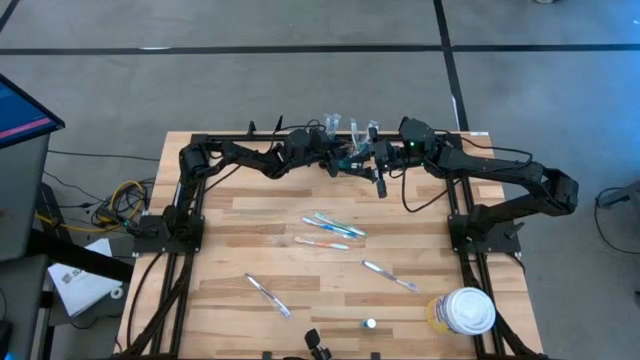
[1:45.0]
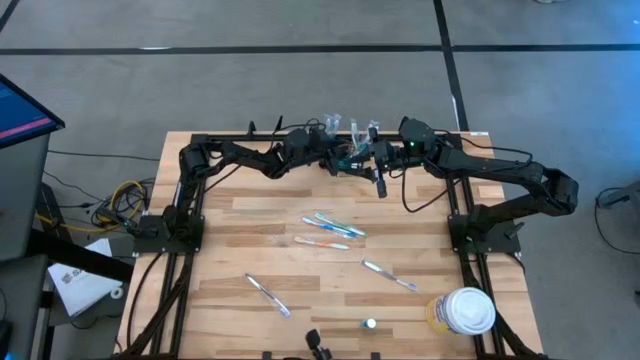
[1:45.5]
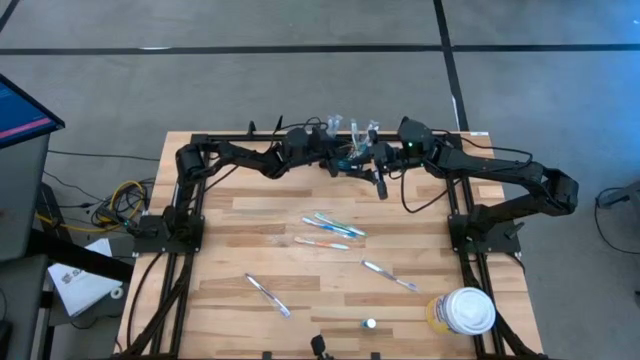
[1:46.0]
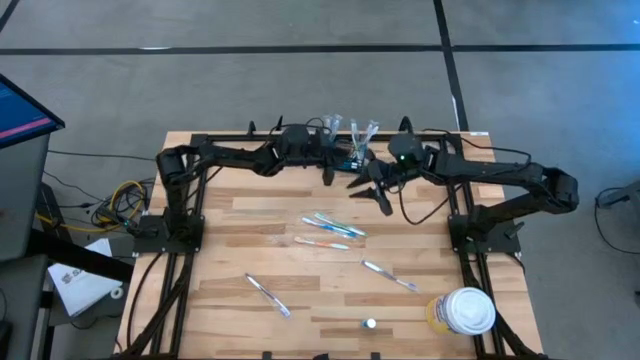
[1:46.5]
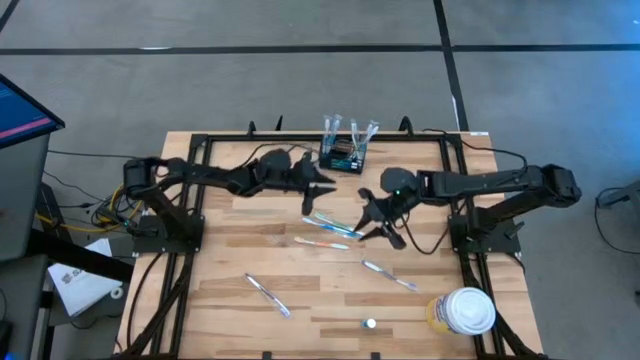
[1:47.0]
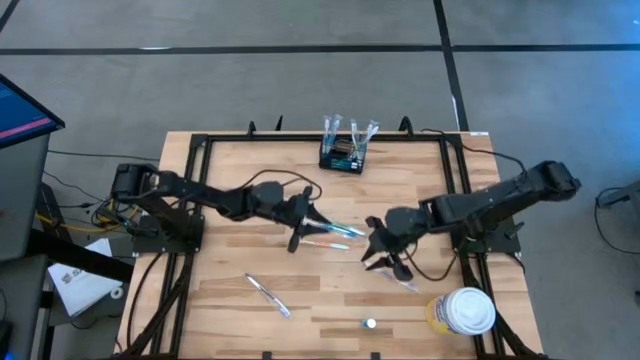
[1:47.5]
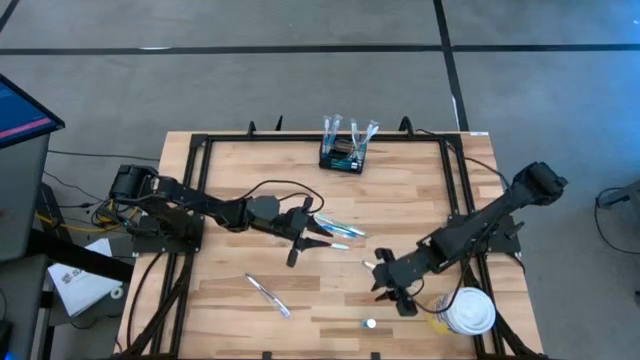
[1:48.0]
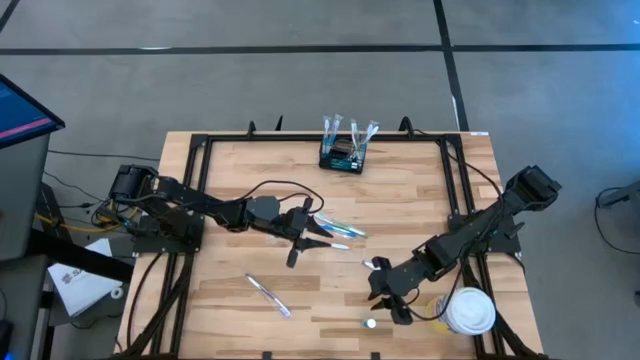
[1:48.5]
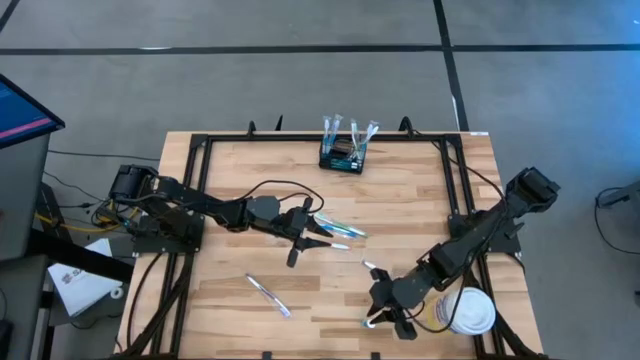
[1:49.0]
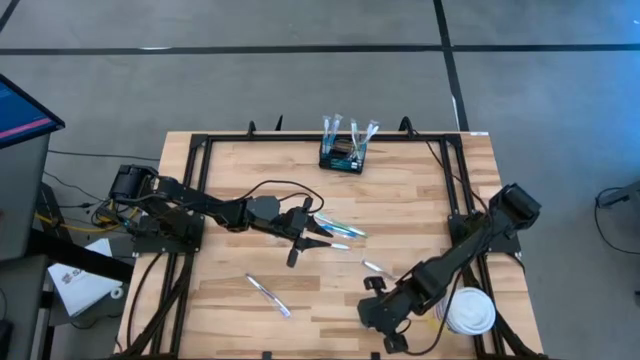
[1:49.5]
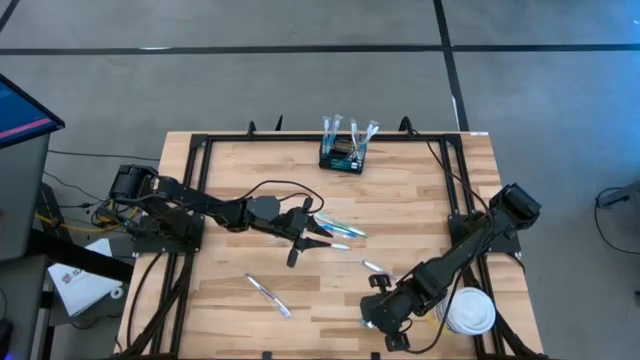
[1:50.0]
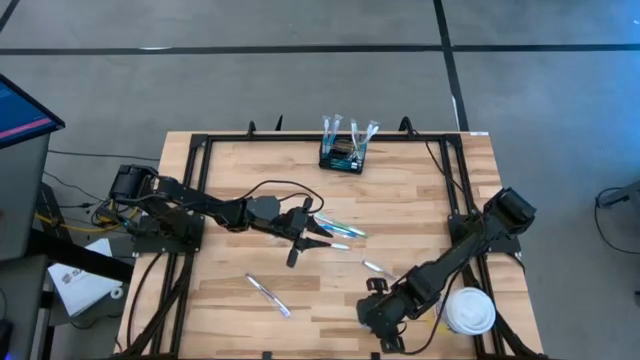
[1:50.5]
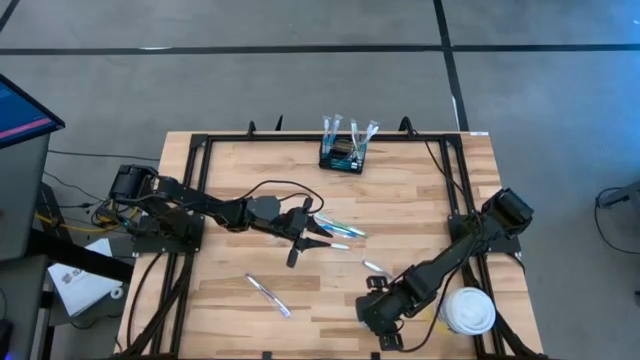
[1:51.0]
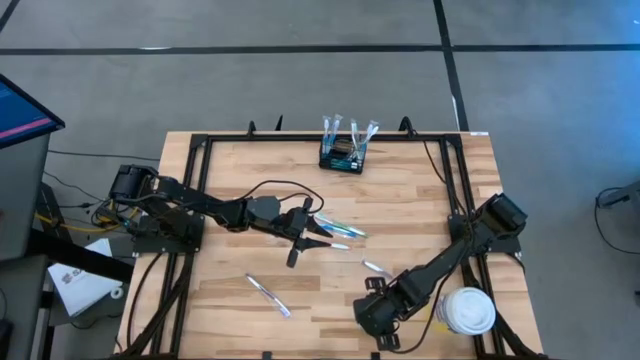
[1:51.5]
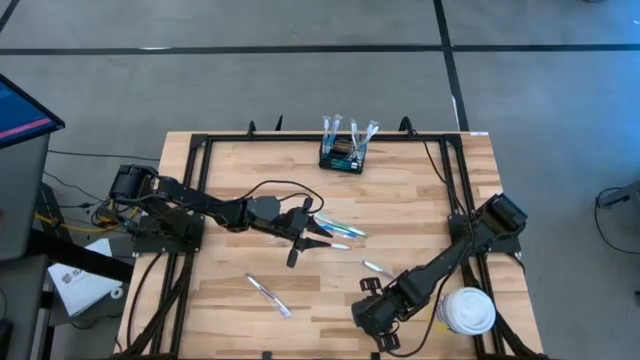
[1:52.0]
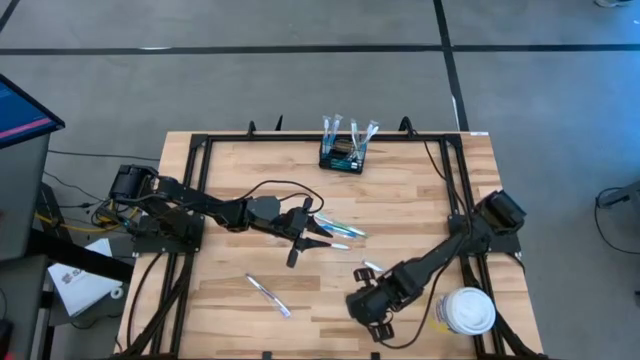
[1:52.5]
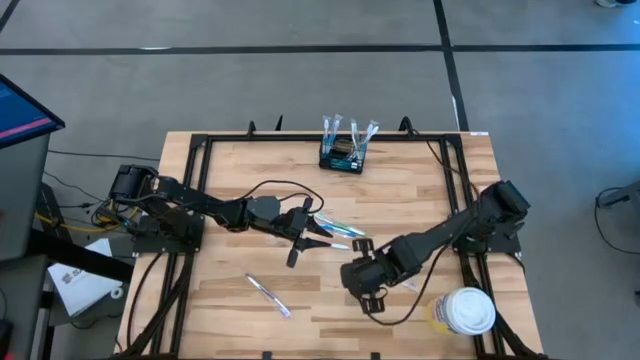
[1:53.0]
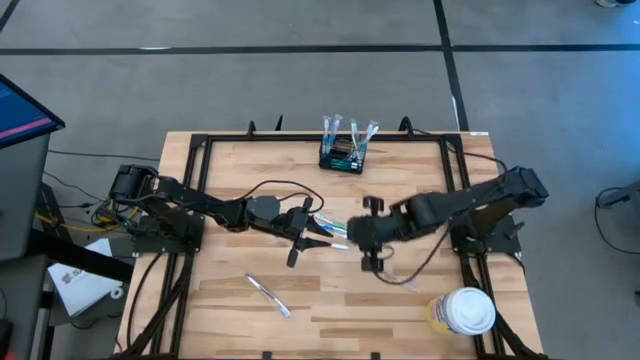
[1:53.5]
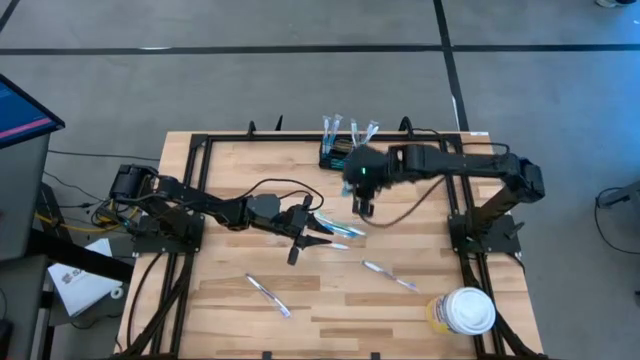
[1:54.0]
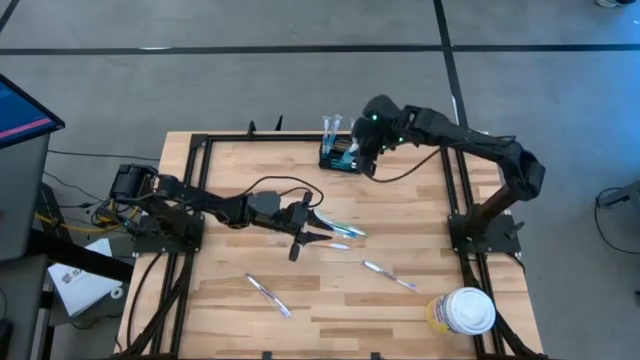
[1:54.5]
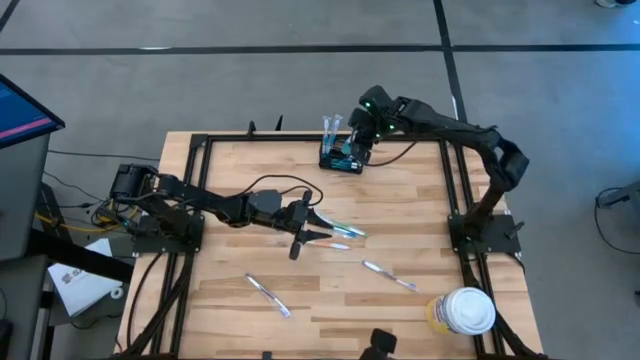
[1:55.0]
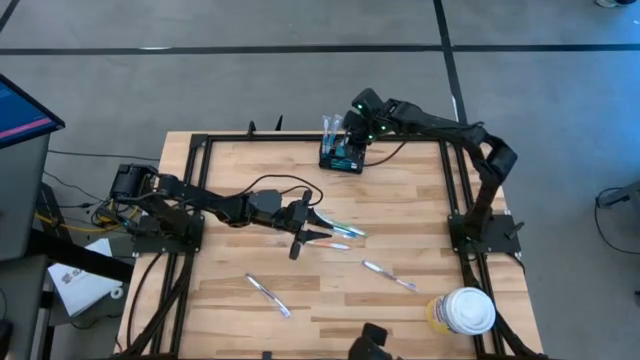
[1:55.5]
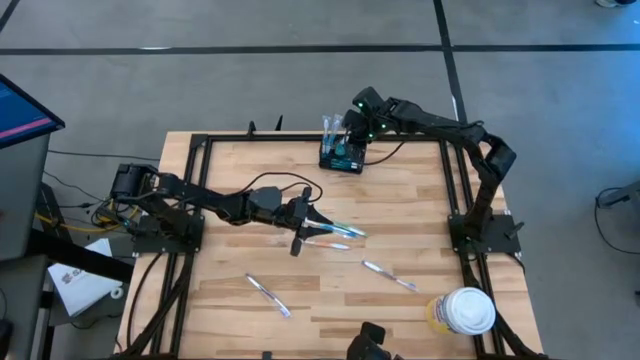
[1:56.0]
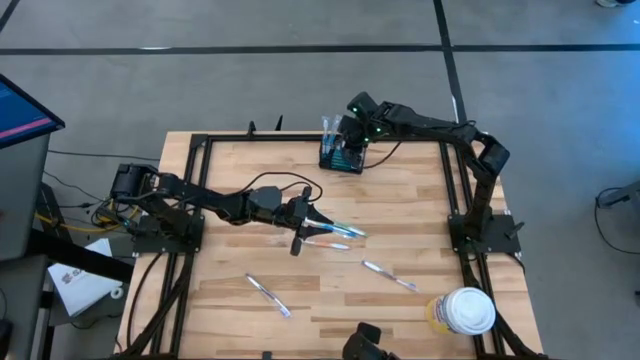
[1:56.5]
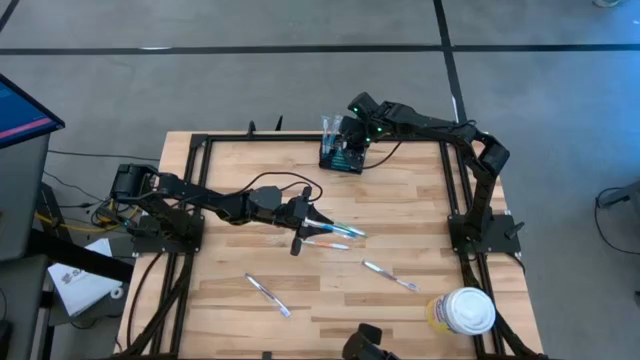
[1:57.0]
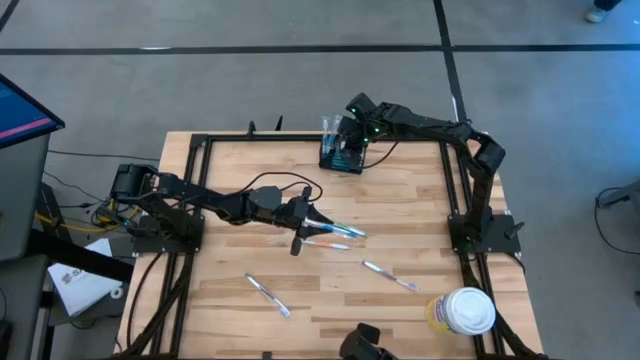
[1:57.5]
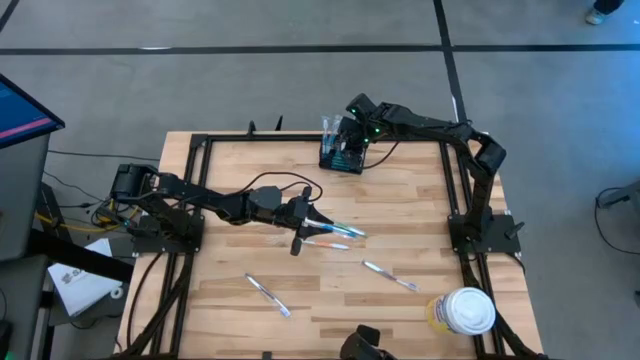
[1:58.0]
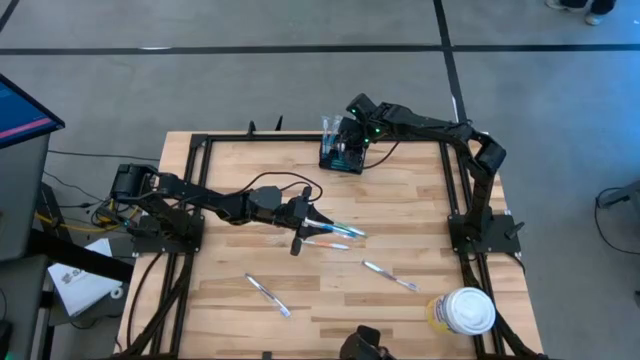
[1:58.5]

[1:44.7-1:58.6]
Task: Pick & Place toothbrushing station
Put the top blue mouthwash into the mesh organizer

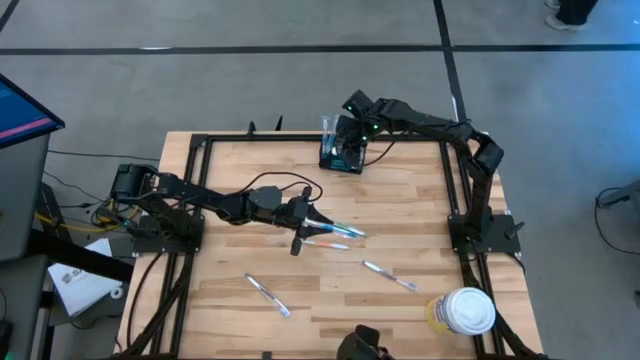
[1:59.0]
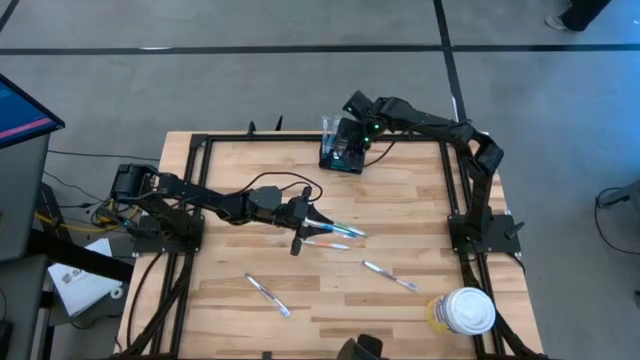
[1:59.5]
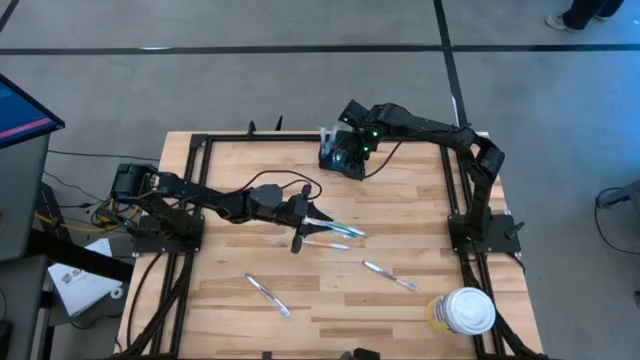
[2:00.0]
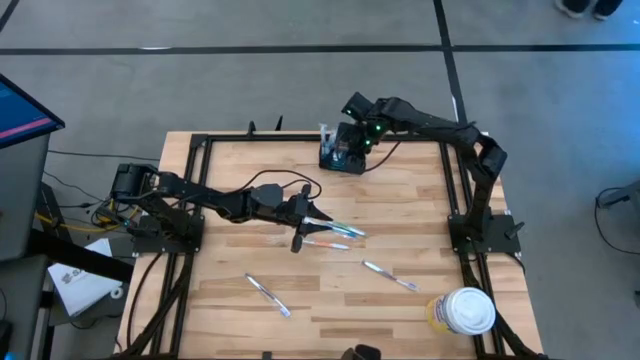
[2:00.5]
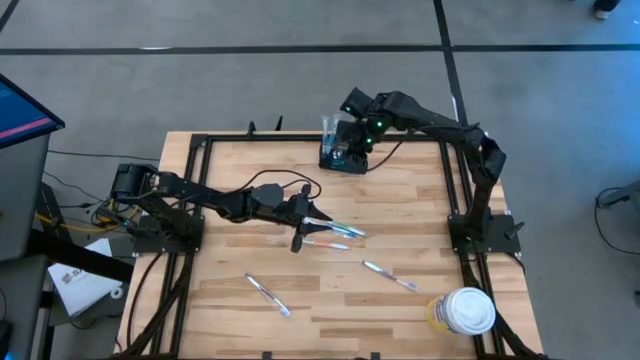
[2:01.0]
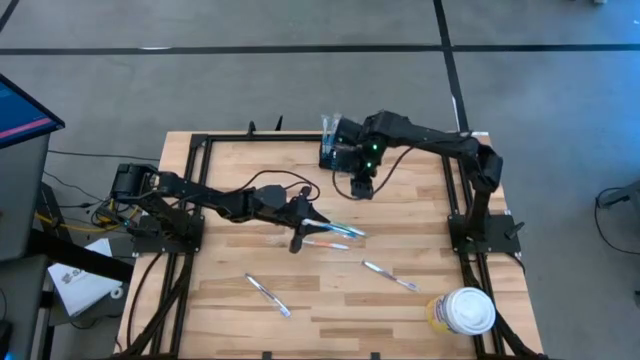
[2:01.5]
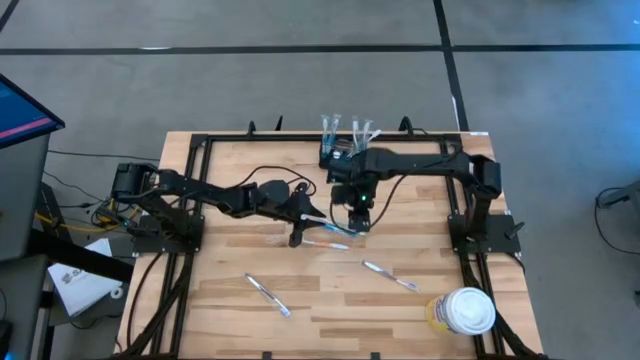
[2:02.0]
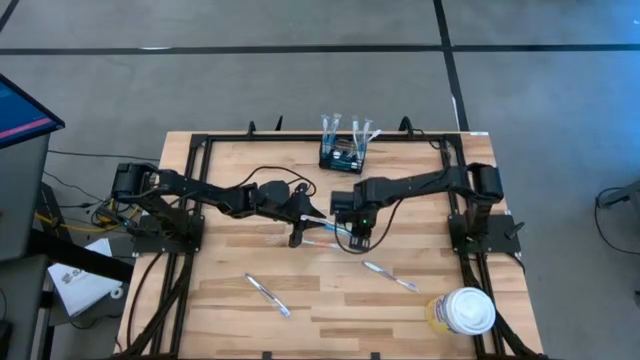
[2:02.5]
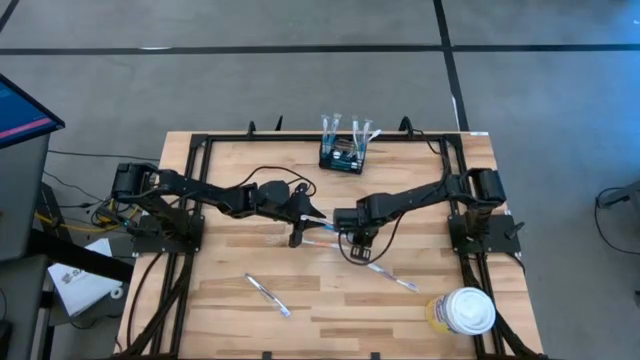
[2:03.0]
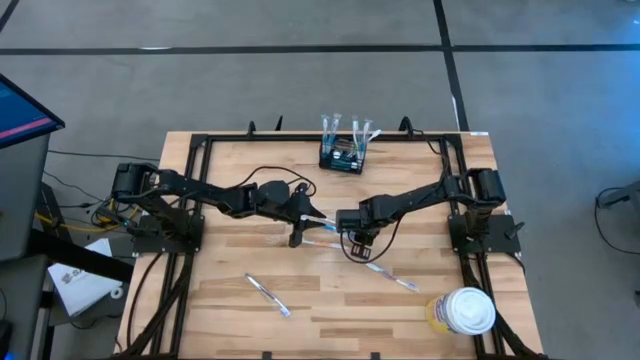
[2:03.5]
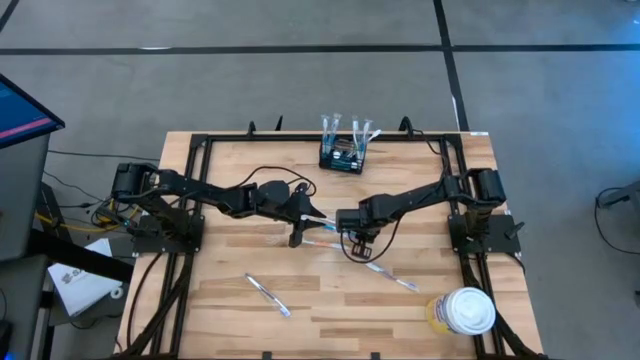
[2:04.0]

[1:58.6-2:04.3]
Put the green toothbrush into the mesh organizer
